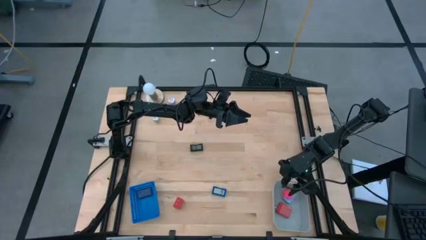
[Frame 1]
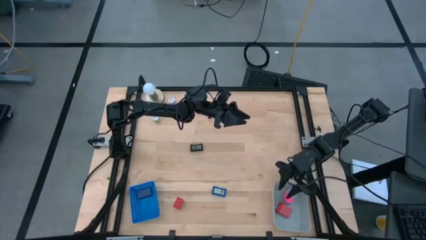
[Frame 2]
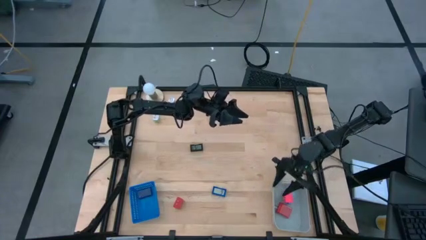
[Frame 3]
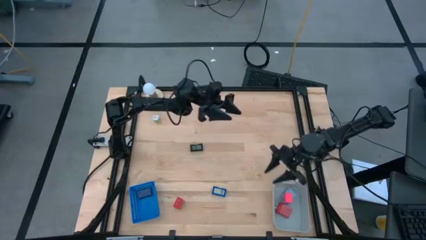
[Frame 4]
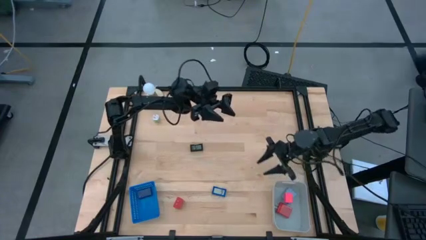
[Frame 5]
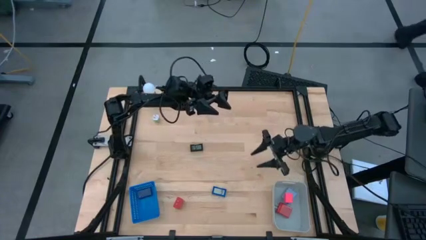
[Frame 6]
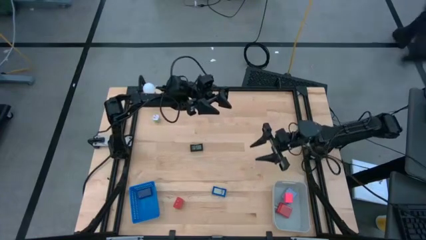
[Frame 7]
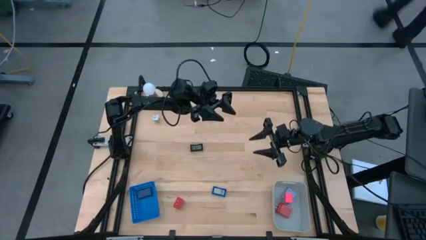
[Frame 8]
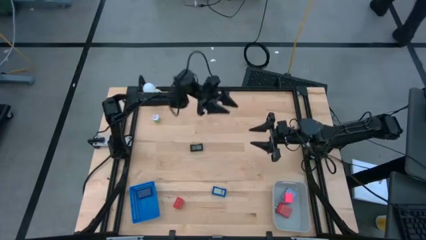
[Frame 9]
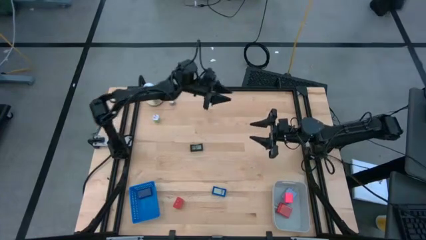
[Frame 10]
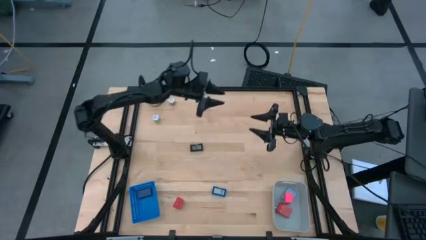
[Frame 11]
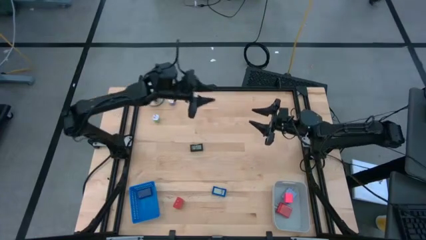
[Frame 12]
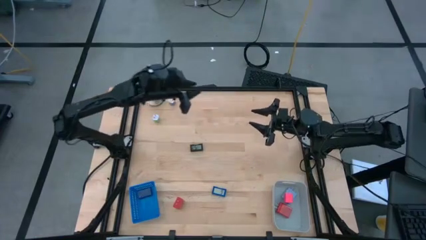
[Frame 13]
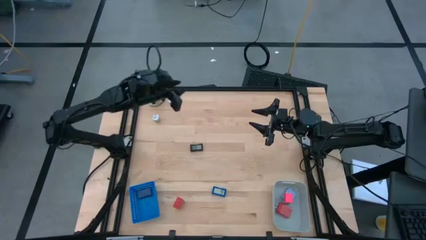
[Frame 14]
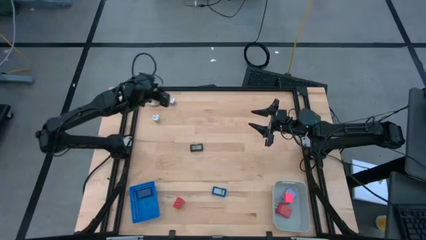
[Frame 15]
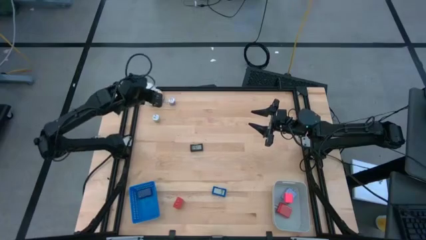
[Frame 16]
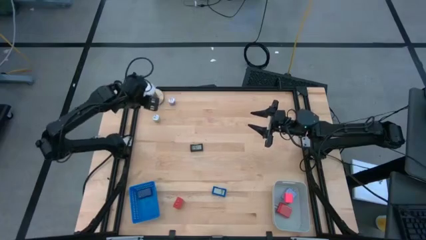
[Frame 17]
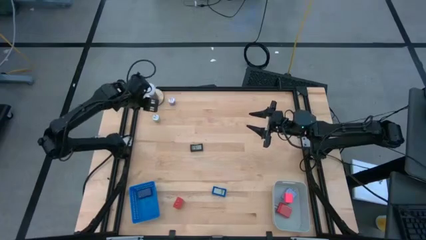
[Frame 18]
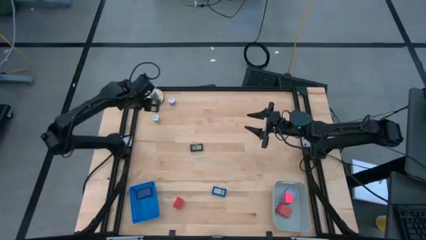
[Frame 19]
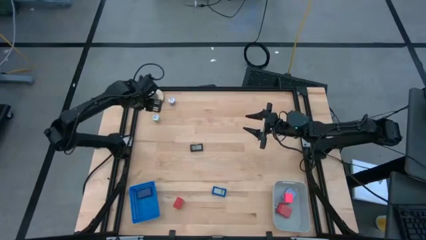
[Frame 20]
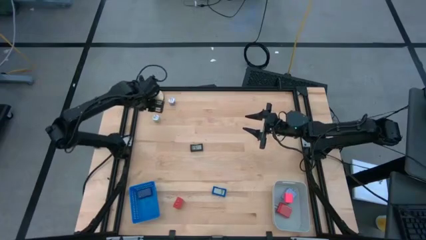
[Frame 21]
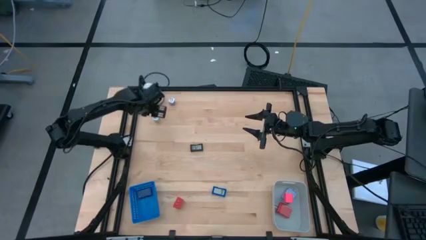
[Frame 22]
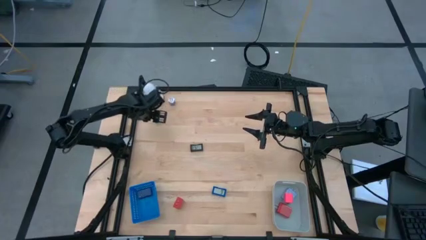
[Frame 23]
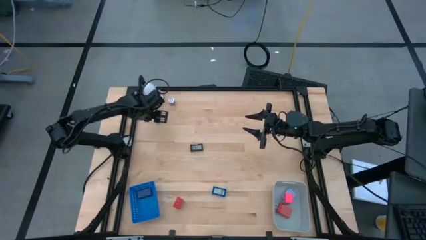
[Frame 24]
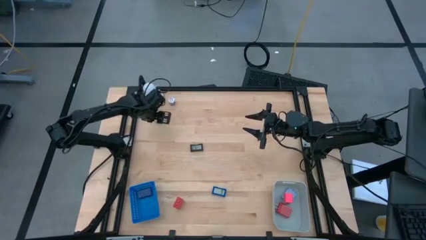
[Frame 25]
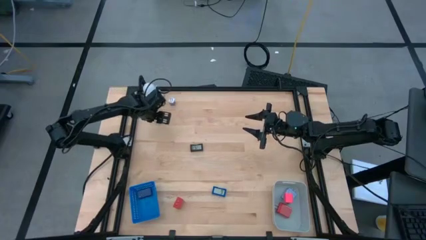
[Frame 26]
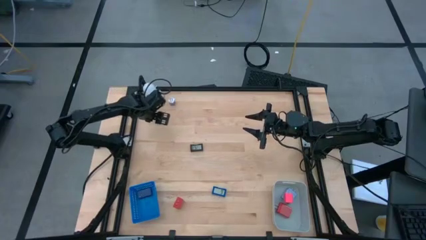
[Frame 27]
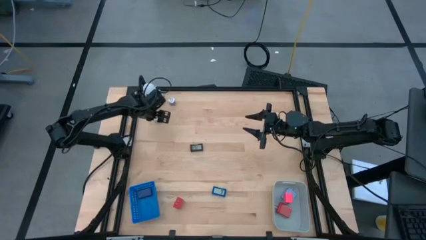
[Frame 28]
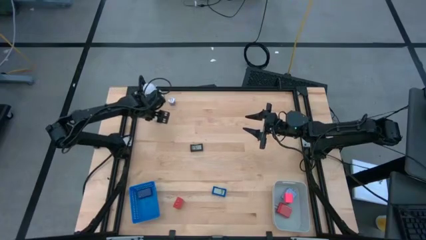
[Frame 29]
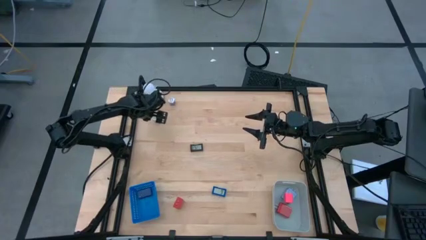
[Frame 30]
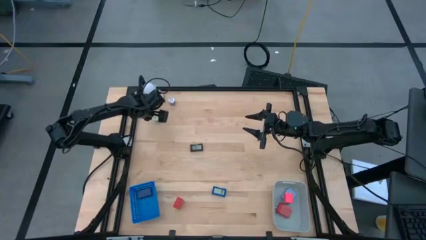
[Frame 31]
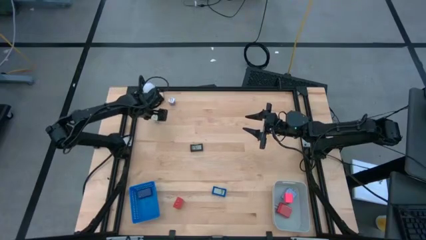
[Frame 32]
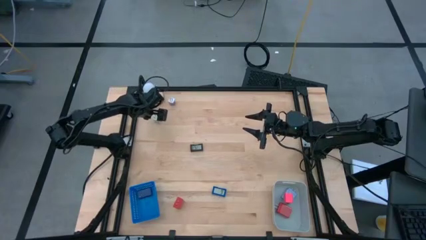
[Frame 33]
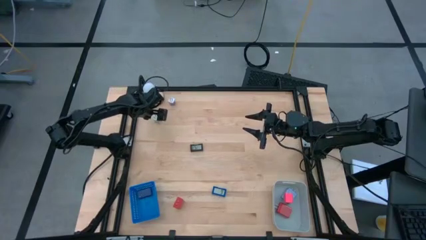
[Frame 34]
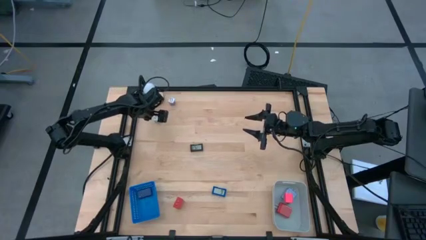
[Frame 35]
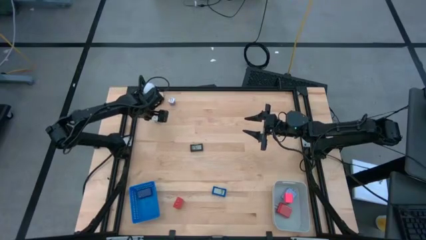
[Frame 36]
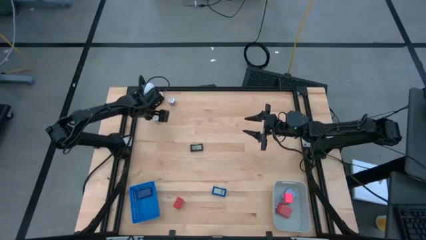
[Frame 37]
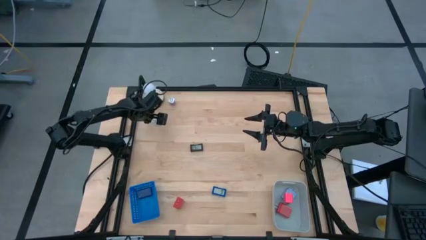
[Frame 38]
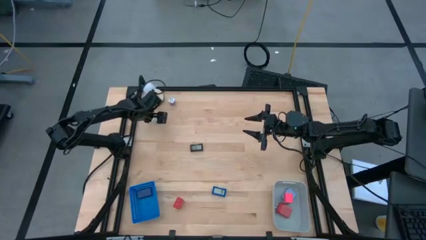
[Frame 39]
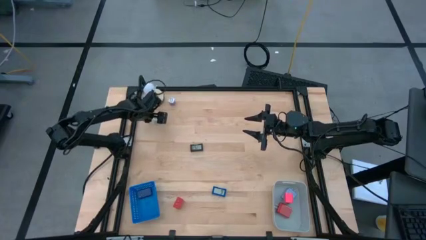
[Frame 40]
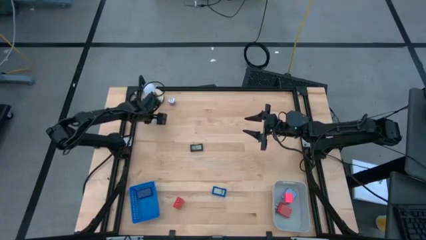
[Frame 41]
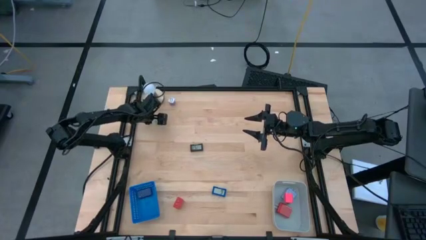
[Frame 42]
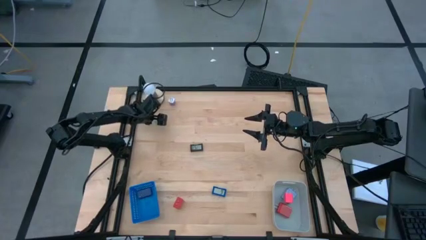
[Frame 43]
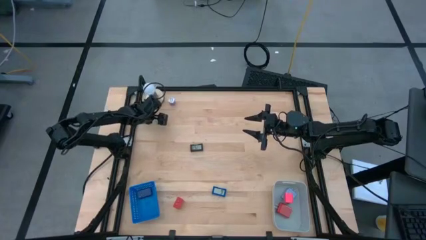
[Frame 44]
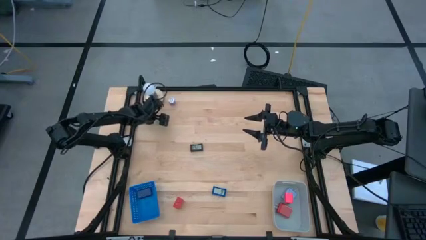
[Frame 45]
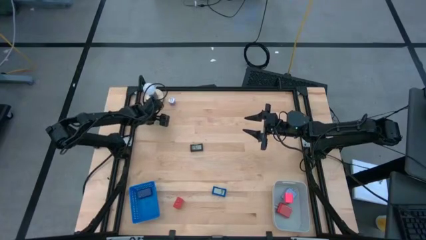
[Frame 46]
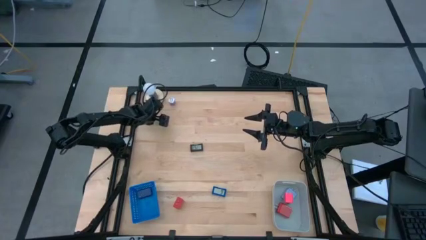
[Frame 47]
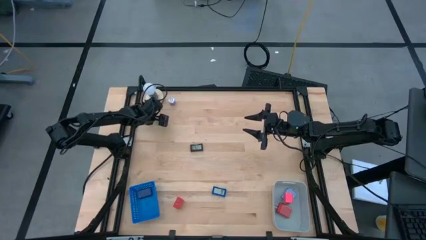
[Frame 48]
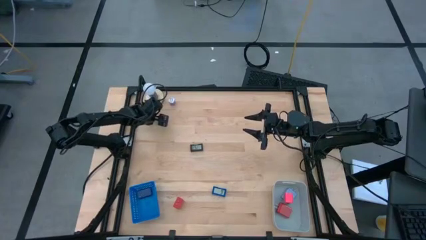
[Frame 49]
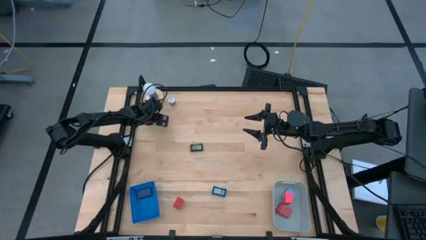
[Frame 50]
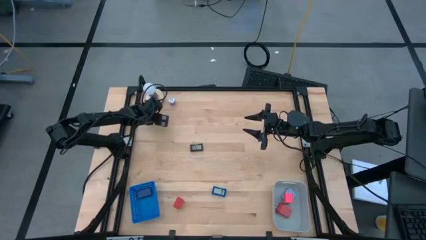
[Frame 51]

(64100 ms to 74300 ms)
Task: Pick & Place Office items
Put the light green charger adapter into the gray bin

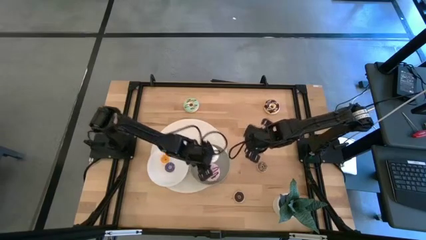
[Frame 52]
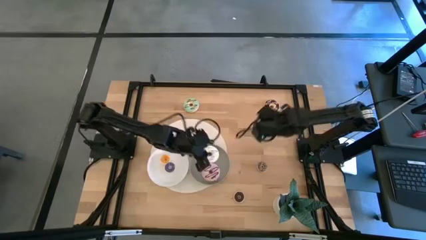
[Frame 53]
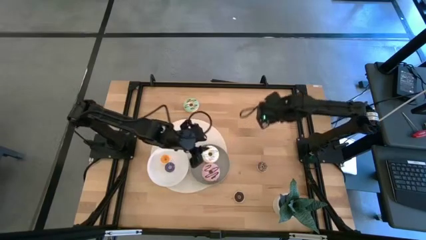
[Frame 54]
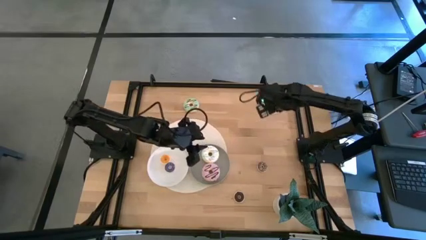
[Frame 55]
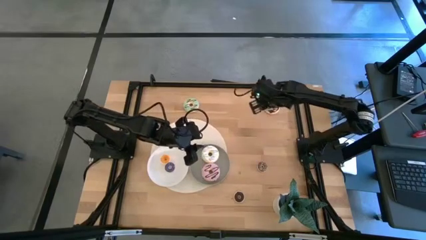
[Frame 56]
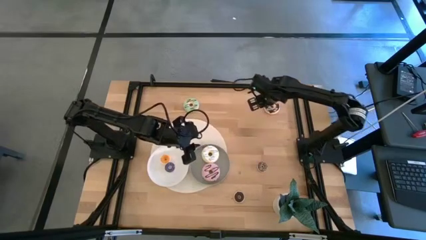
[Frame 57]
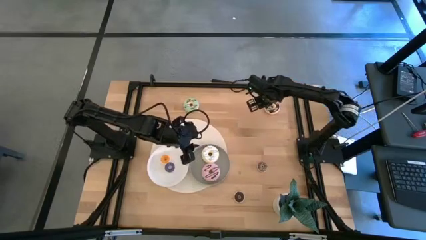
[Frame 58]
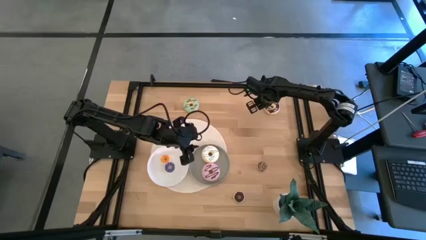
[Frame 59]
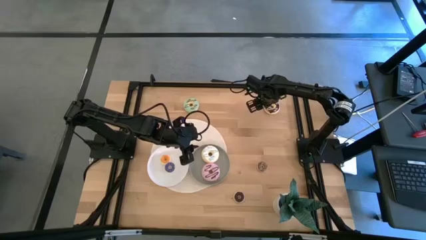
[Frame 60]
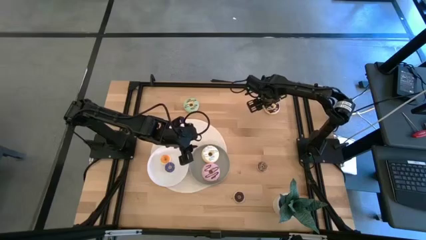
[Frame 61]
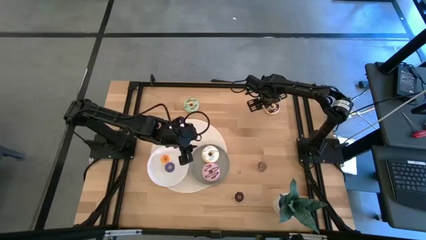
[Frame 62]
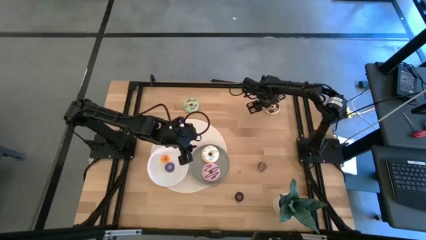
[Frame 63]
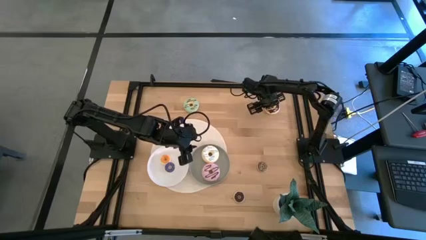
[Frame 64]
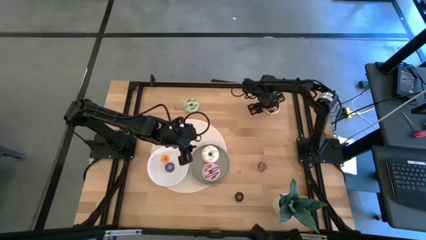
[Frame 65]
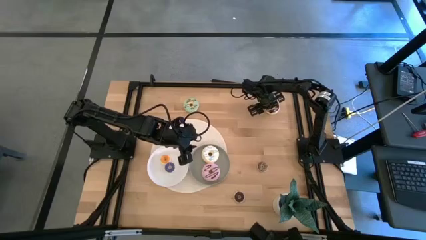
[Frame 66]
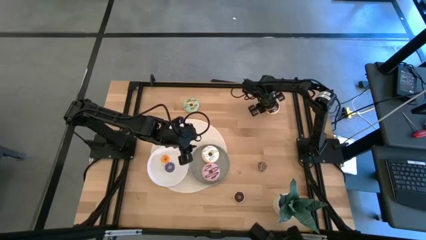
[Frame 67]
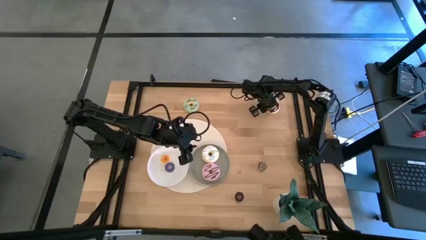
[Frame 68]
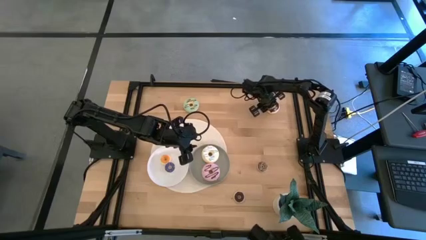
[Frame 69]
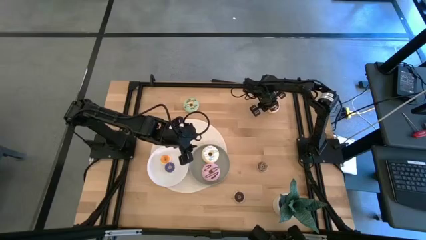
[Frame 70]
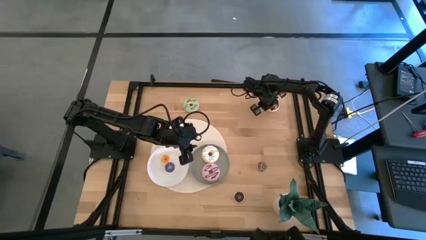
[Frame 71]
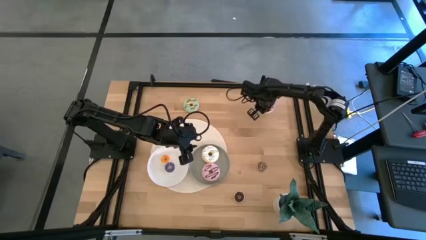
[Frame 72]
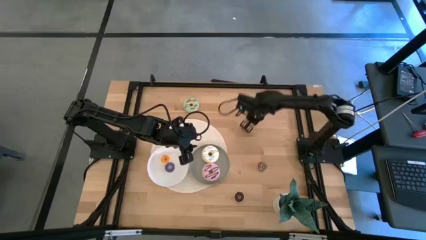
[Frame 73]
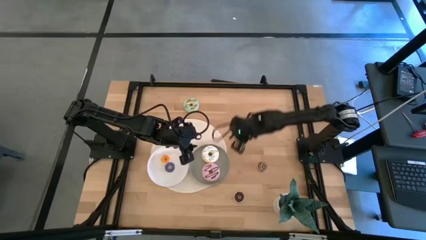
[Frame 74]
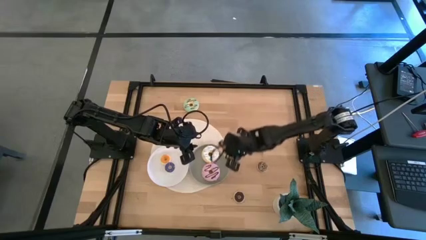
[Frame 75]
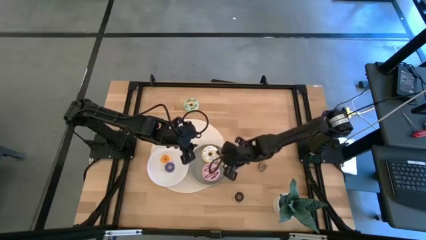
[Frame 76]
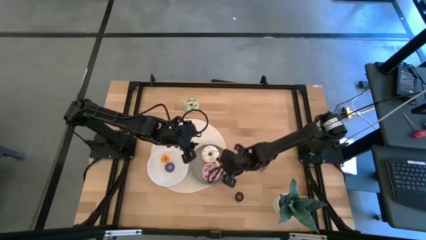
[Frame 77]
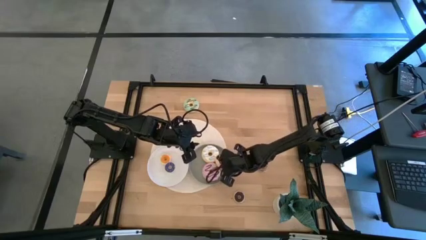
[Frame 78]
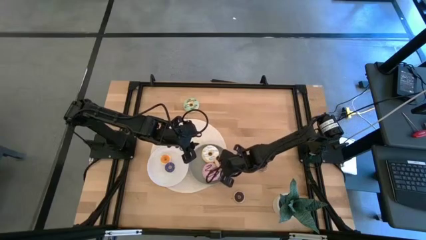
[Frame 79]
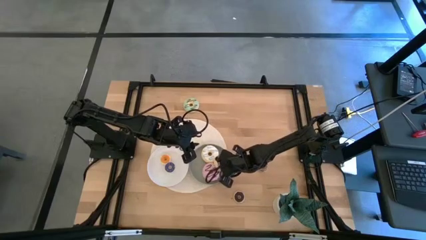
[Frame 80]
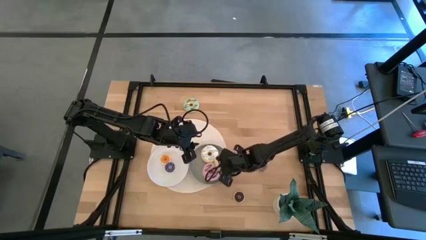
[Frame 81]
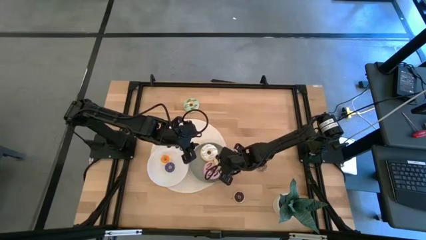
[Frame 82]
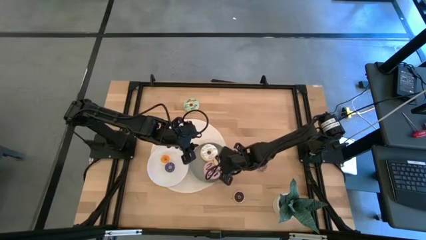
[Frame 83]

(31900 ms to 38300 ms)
Task: Pick & Place donuts
Put the big black donuts on the gray plate
